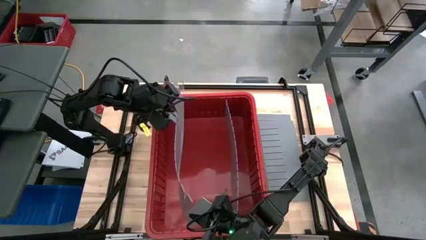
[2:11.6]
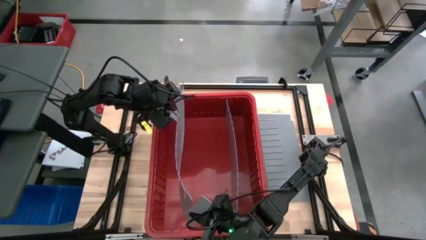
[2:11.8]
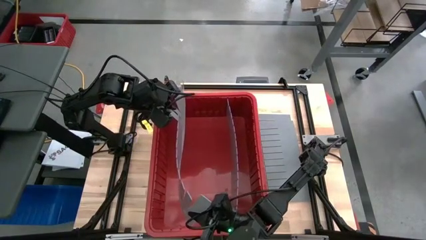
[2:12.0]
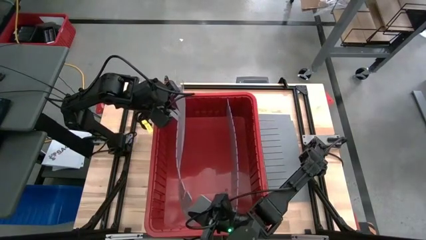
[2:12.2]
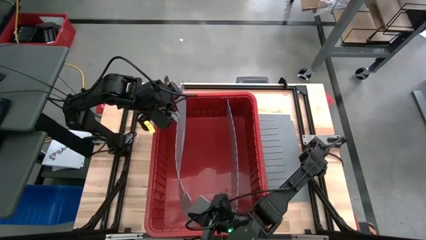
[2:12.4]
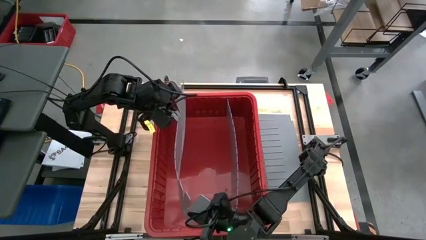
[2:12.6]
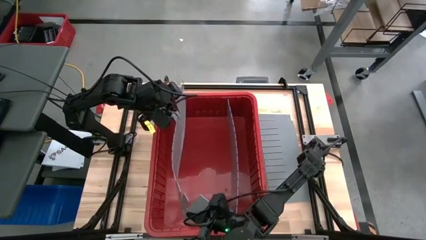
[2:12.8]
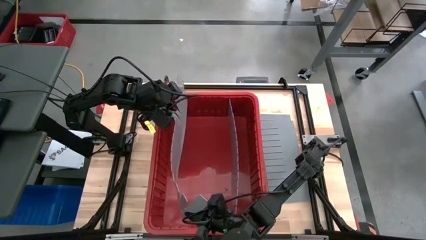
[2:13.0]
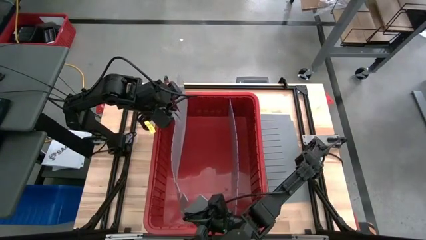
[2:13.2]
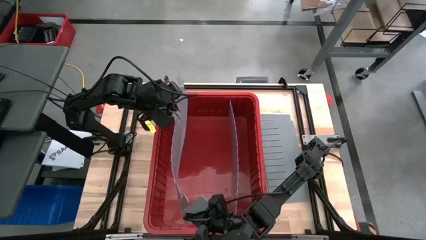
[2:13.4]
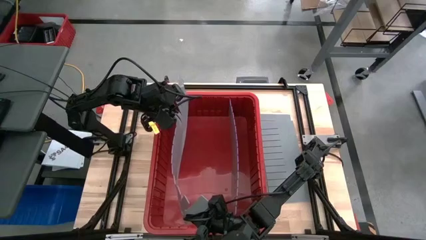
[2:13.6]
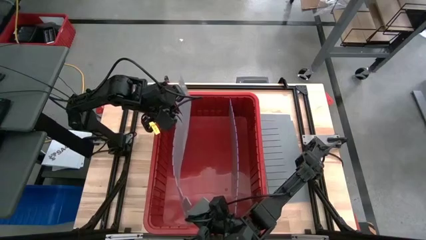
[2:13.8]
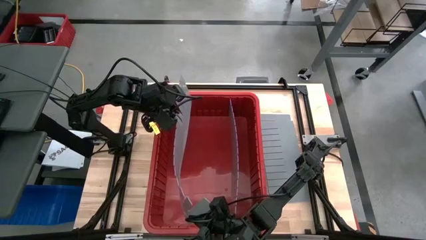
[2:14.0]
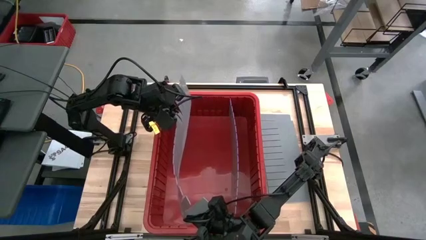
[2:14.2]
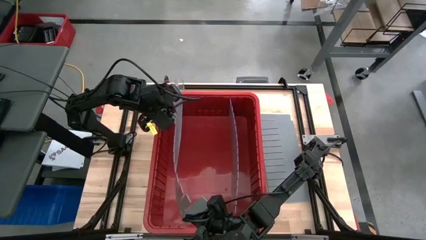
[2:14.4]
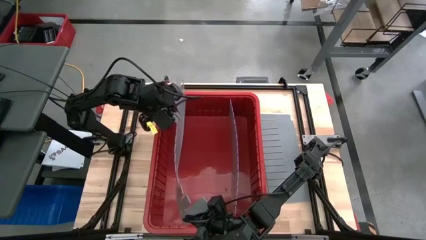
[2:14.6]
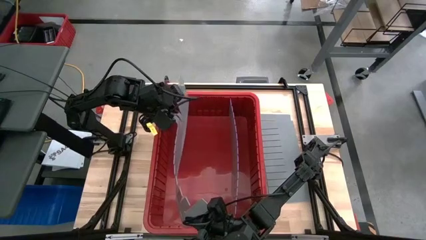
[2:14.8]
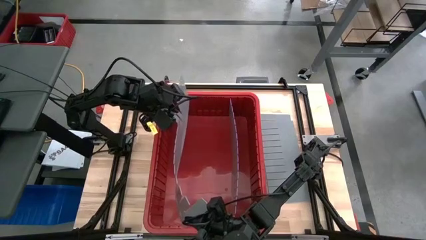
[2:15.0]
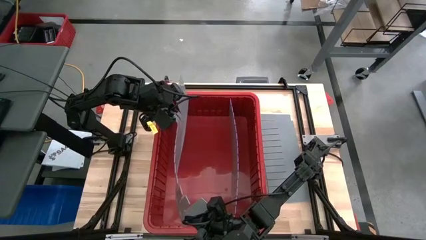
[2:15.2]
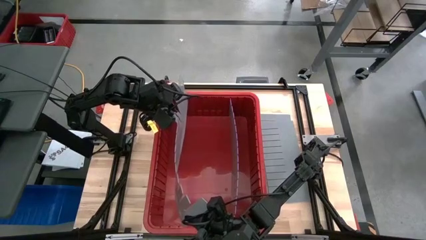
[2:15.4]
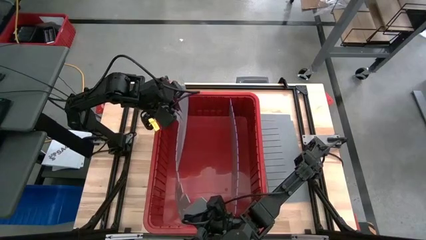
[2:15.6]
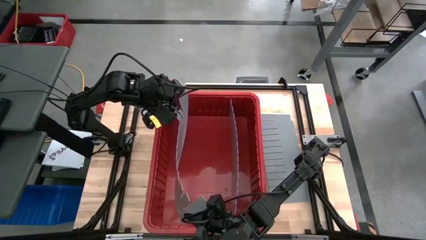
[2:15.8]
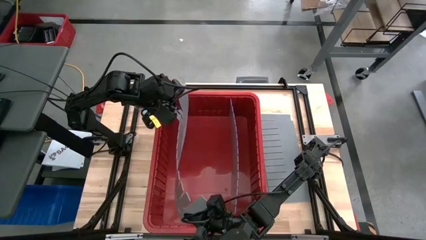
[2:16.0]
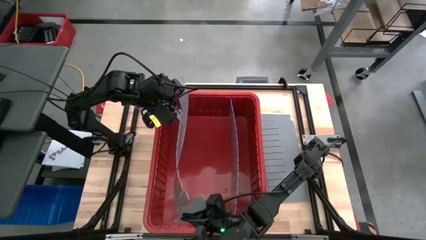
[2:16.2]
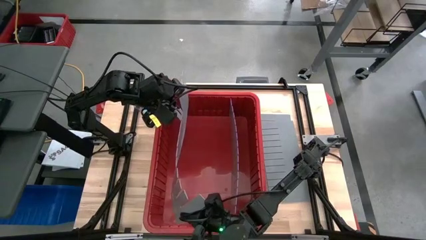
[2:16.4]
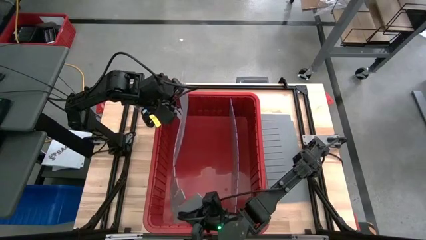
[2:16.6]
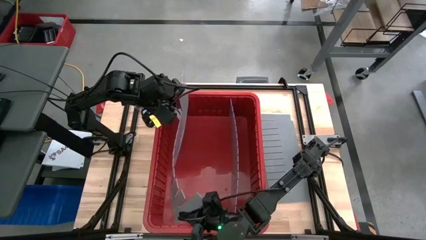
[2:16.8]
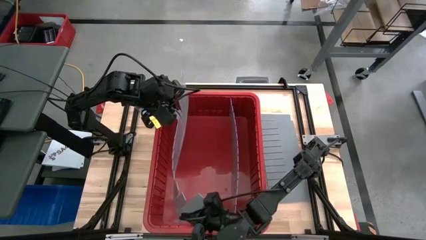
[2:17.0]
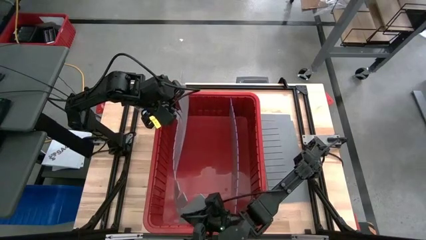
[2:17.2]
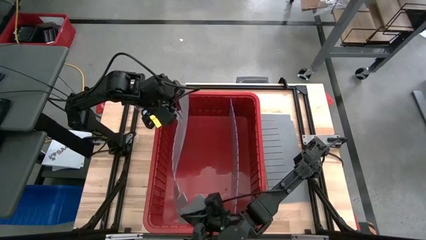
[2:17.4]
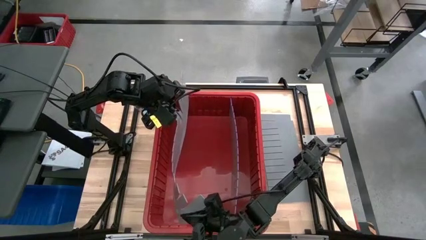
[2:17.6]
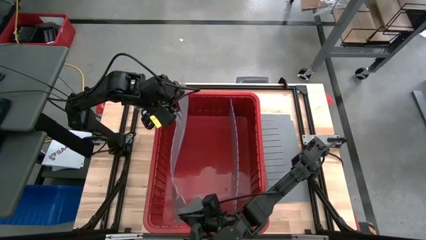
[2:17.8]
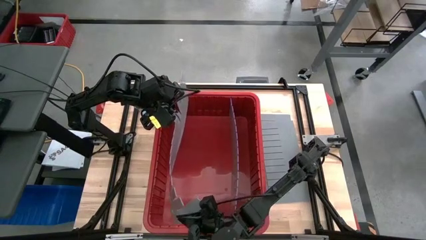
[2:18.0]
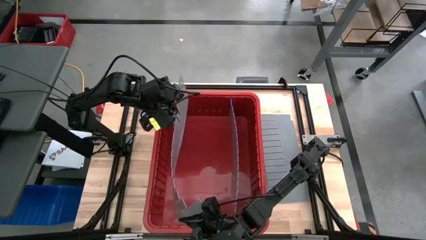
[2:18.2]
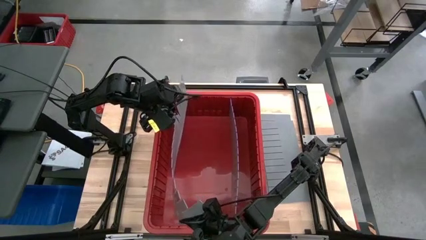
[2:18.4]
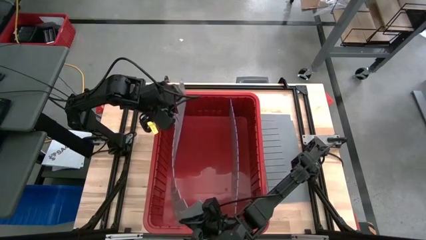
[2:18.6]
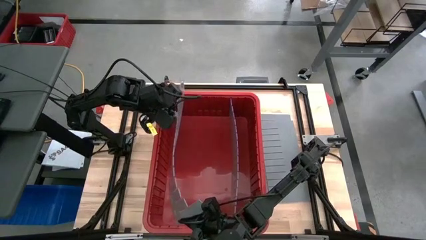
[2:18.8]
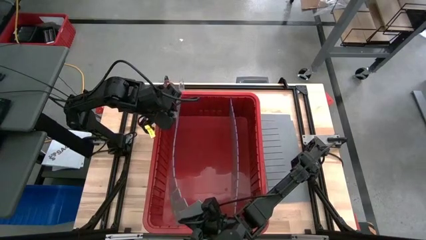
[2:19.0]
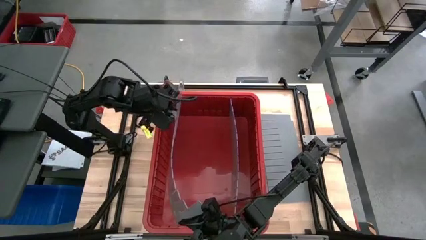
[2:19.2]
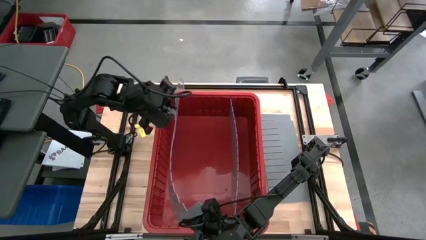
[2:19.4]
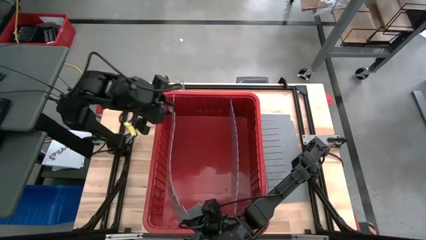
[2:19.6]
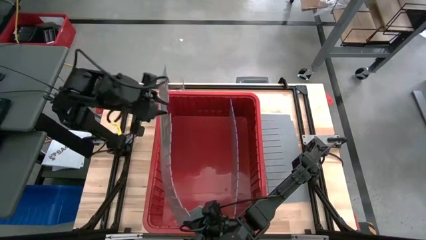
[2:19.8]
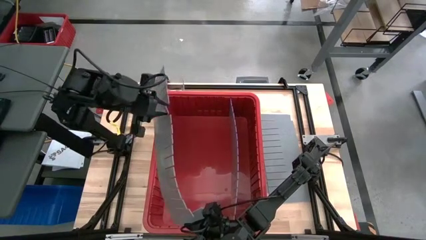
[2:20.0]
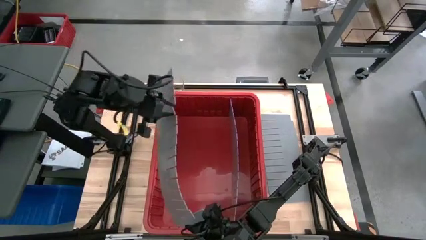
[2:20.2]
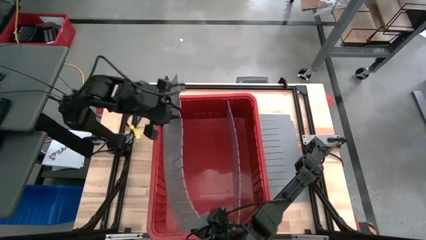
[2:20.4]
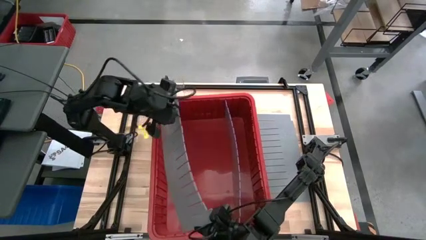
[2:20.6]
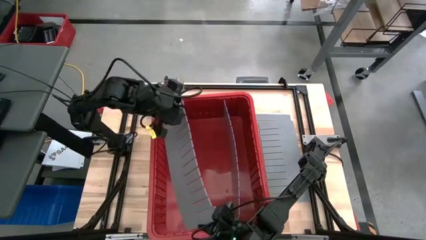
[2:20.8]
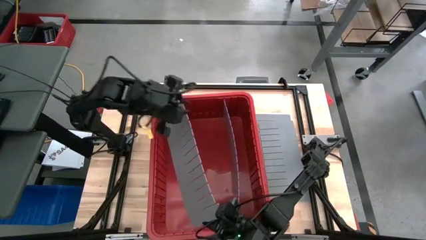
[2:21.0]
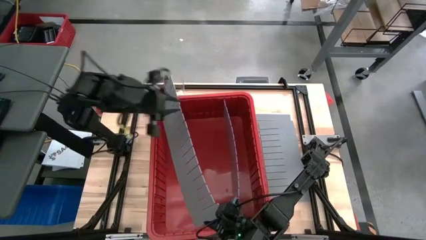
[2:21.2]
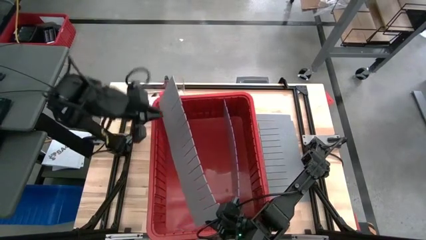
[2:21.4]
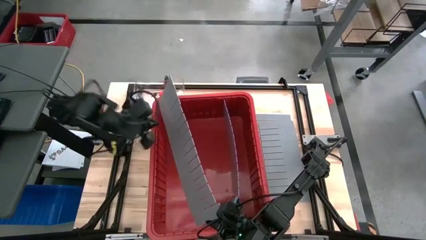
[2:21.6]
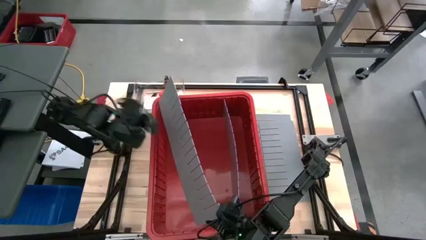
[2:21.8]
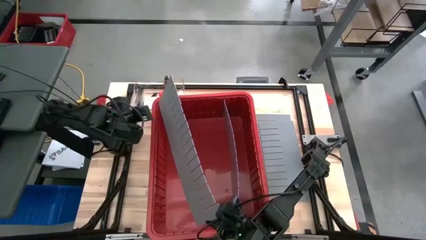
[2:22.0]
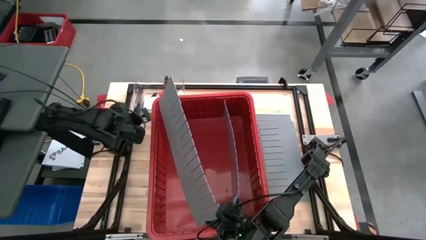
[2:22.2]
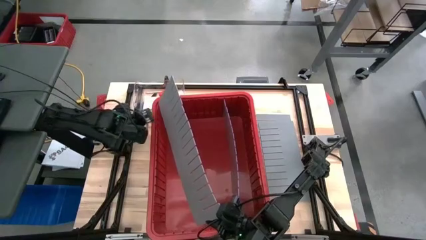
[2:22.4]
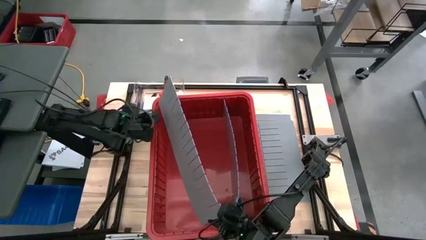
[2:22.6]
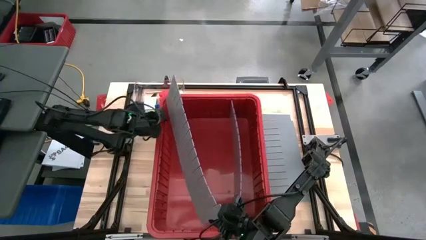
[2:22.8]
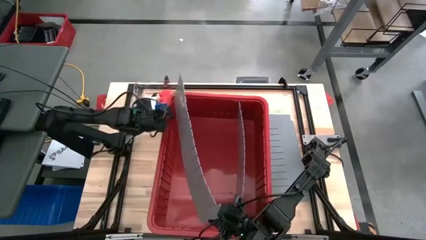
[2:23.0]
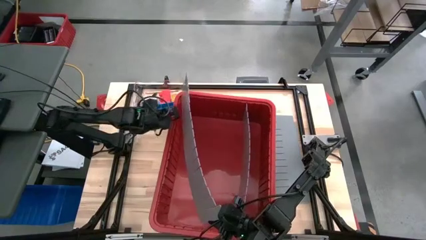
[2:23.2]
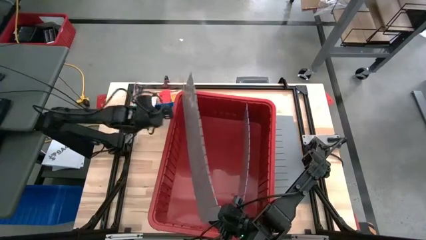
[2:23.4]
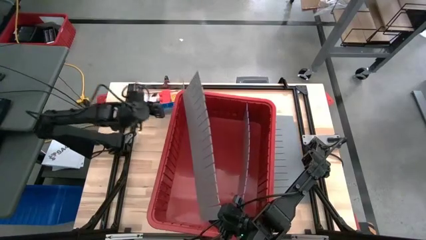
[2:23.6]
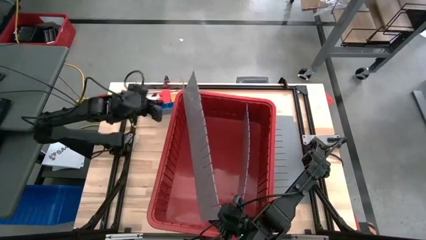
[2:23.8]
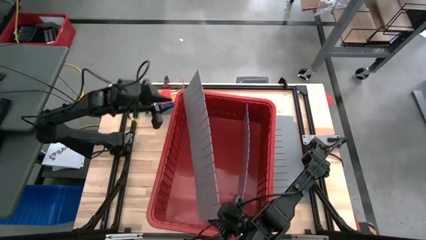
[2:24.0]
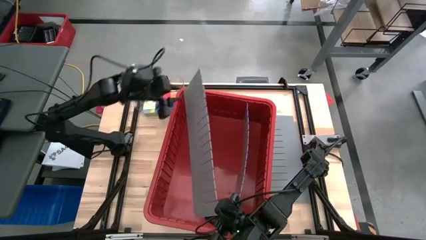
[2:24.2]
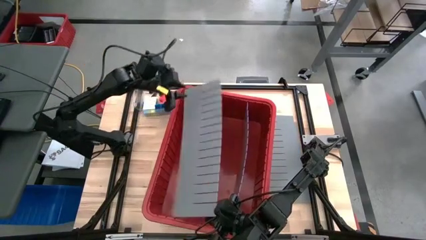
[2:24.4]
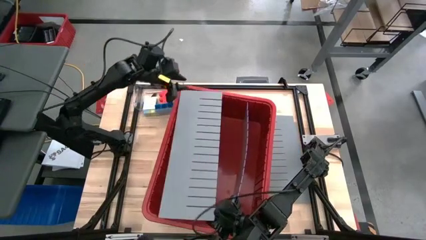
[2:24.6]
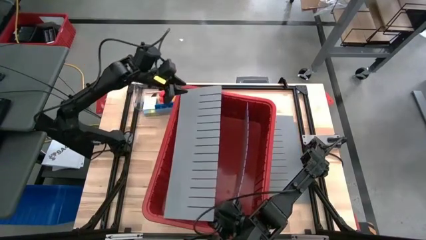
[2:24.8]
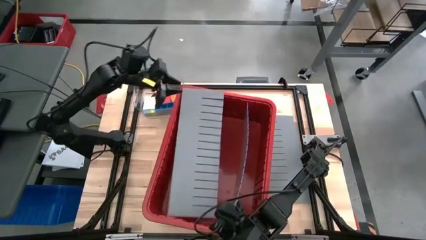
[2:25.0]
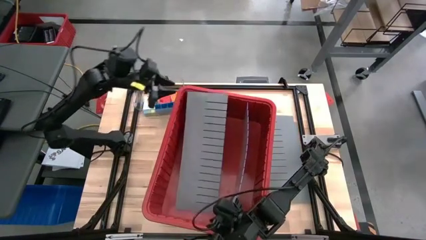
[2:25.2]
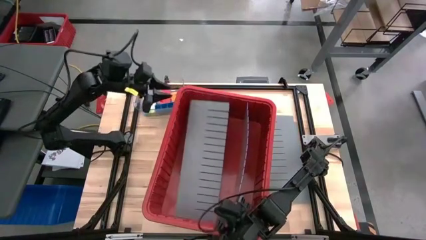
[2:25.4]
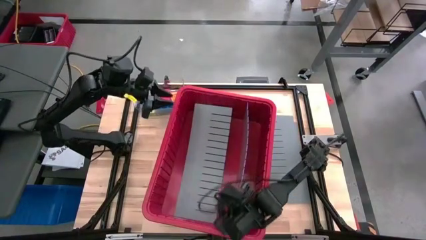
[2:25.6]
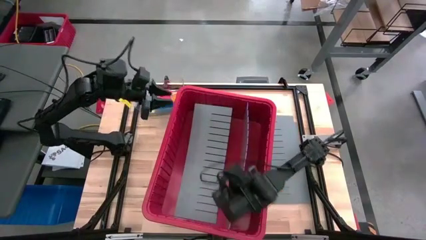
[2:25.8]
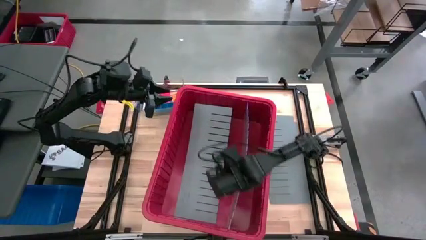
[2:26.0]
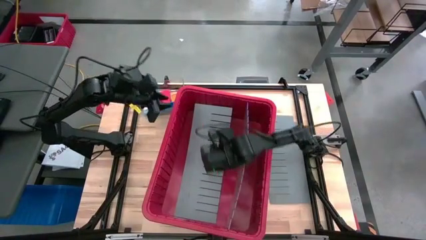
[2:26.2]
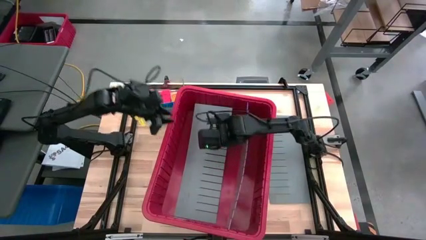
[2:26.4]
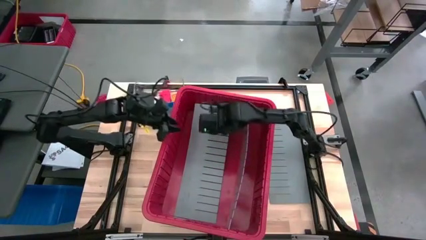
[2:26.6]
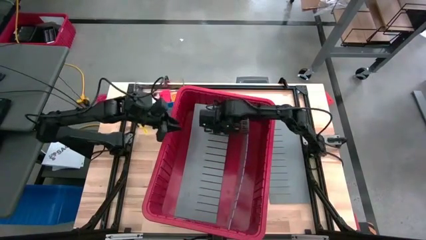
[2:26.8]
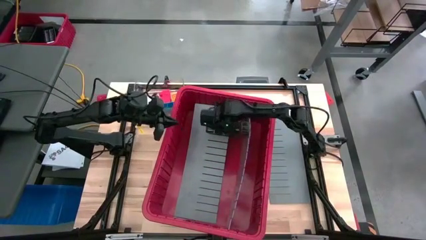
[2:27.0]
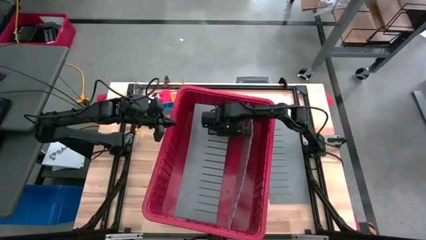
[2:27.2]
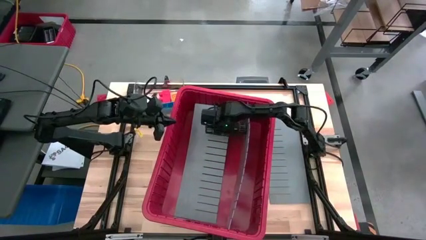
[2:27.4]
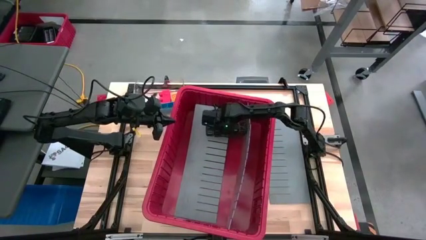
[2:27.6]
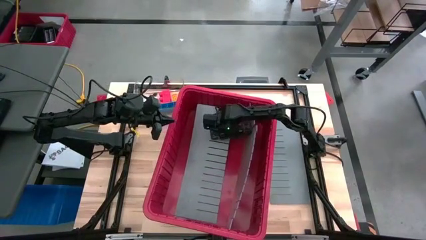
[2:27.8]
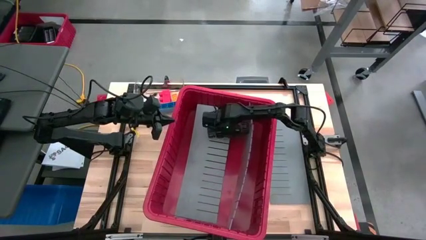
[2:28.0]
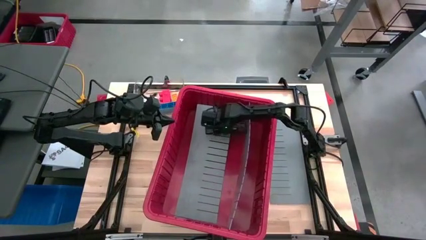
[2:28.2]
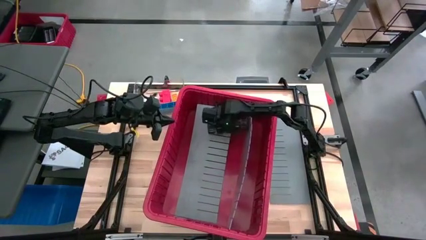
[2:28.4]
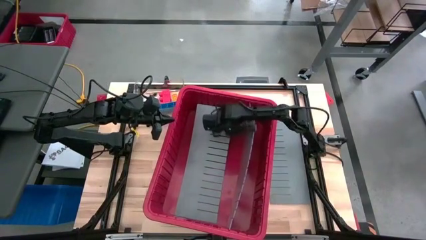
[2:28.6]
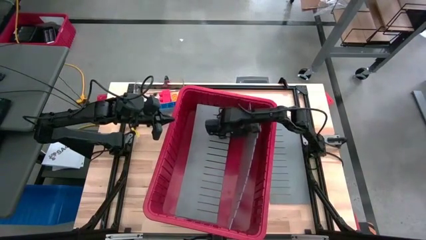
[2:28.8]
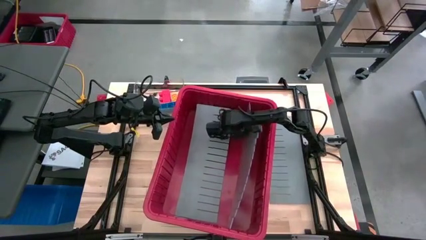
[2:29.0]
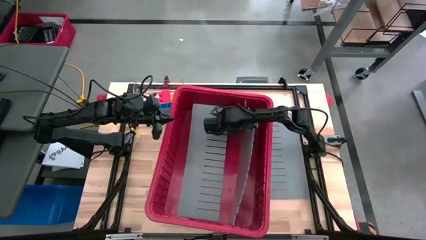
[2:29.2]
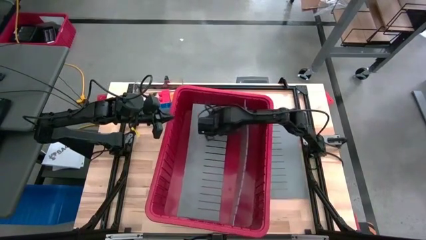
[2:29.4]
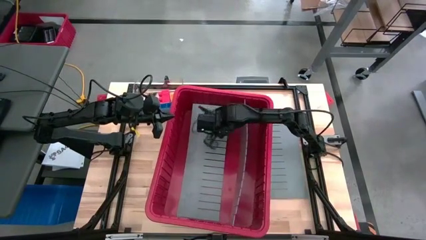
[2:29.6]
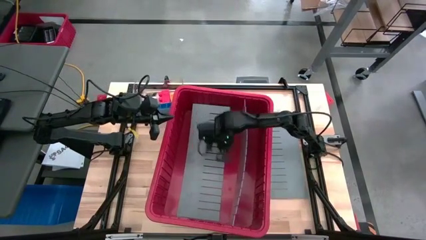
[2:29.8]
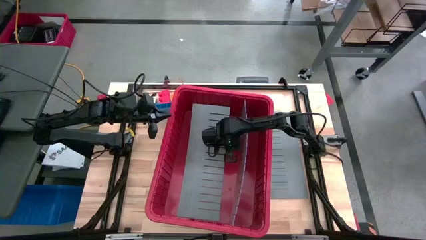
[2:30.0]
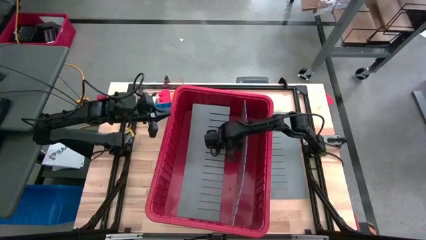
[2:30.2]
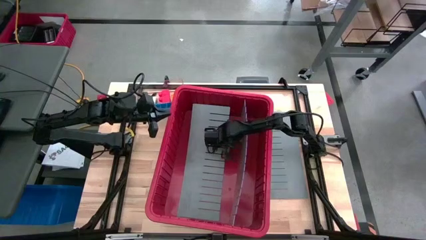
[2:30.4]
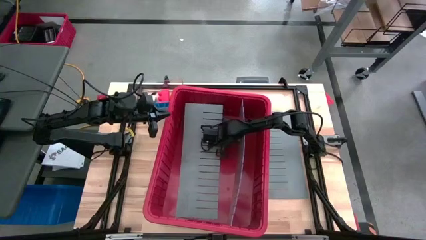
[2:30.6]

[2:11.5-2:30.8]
Task: Sort blocks
Assemble the bin divider into the red bin
